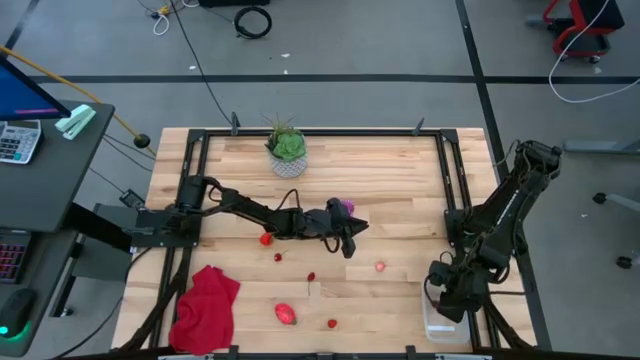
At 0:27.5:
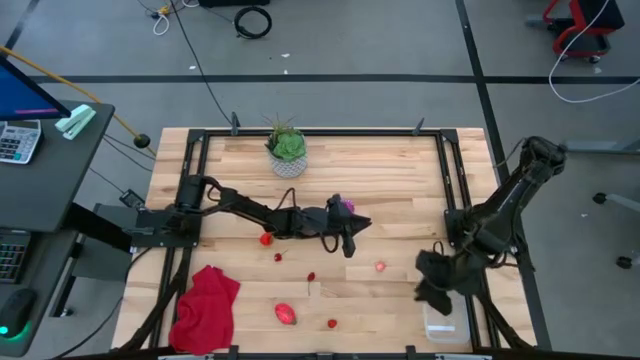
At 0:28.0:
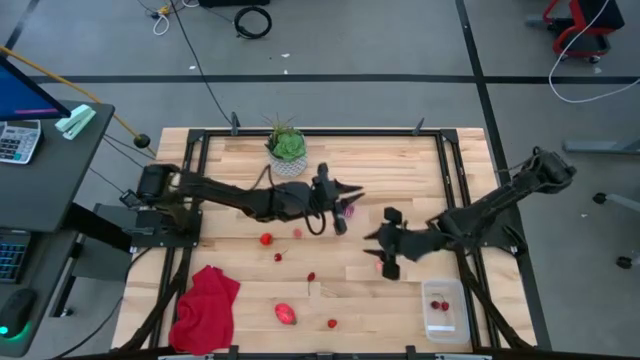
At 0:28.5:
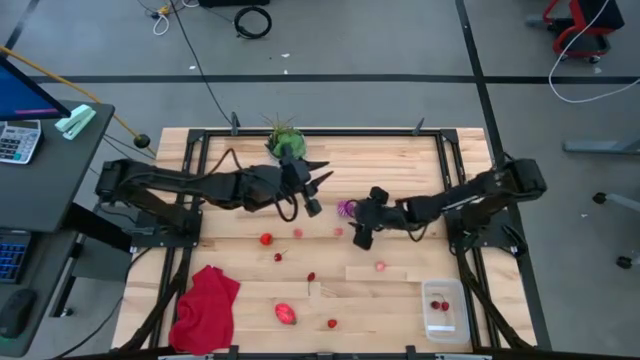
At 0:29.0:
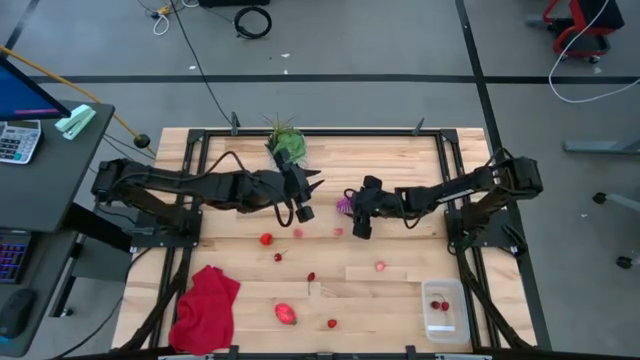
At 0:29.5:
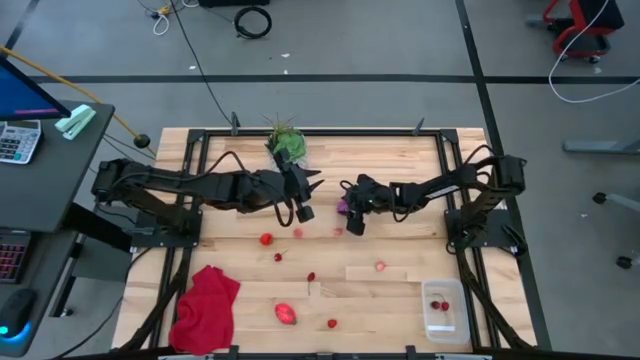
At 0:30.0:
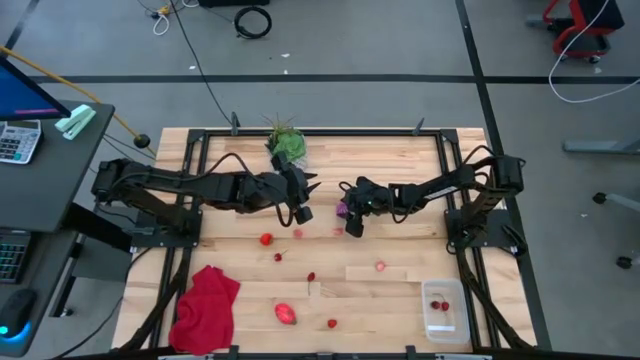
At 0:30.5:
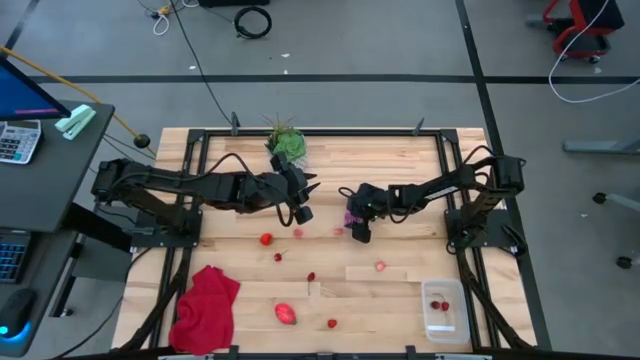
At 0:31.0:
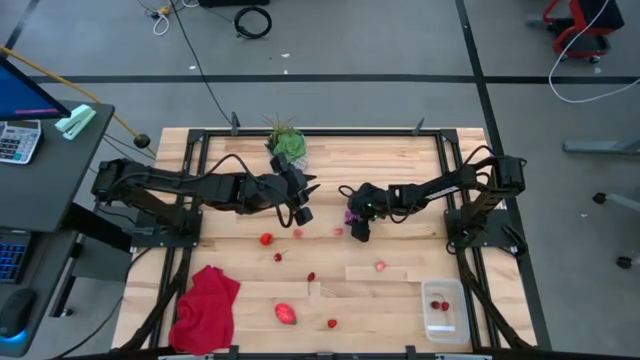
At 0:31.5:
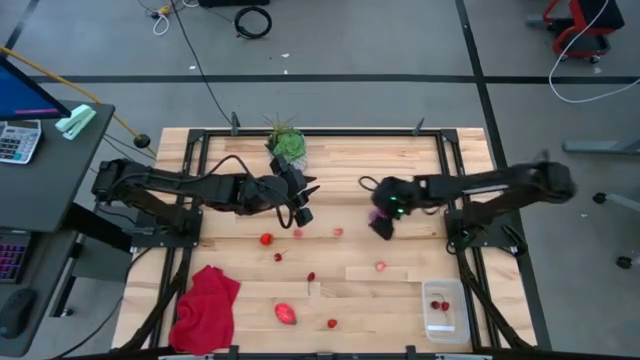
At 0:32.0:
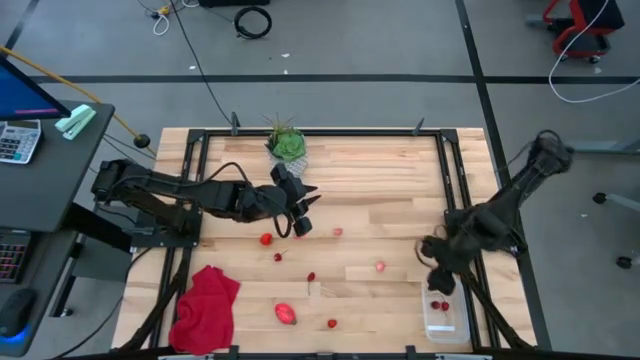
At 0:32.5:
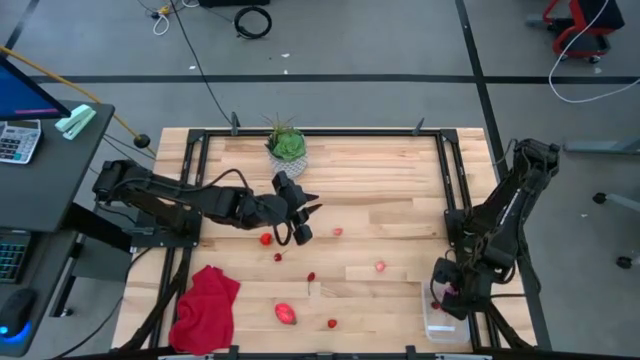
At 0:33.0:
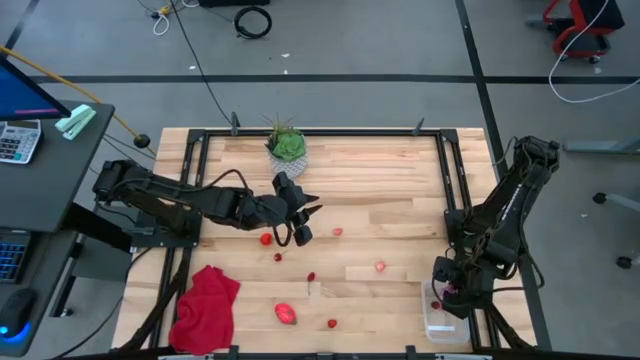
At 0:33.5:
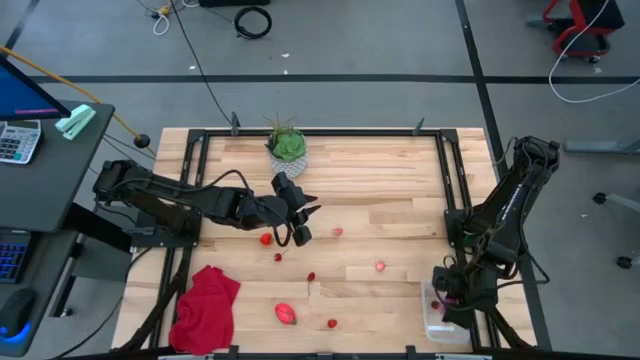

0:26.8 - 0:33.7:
Task: Pick and placing Produce into tupperware
Put the purple onion into the transparent container

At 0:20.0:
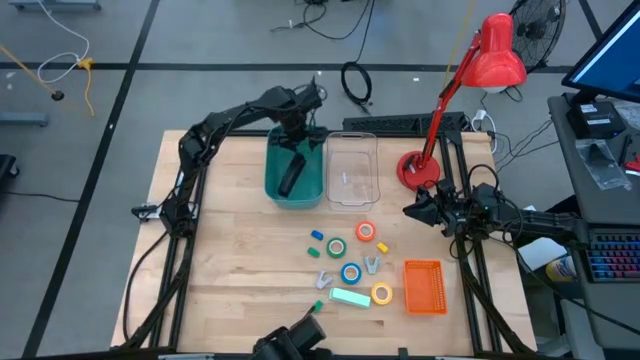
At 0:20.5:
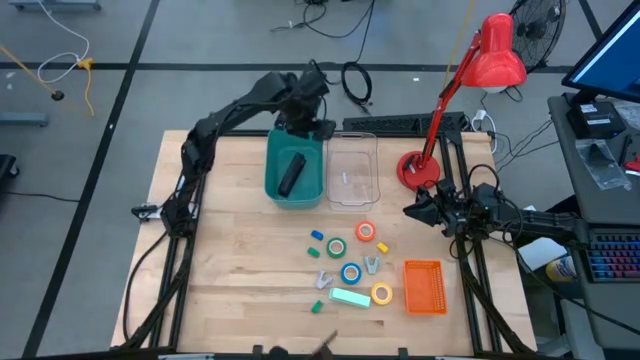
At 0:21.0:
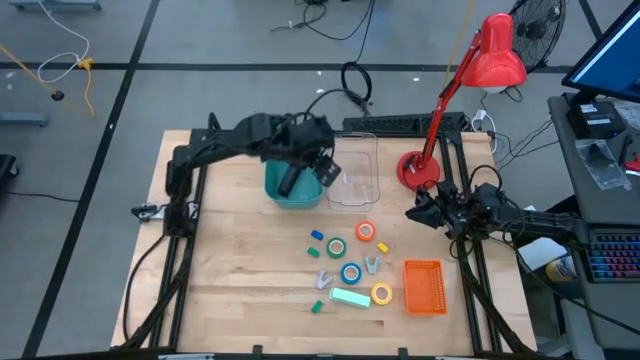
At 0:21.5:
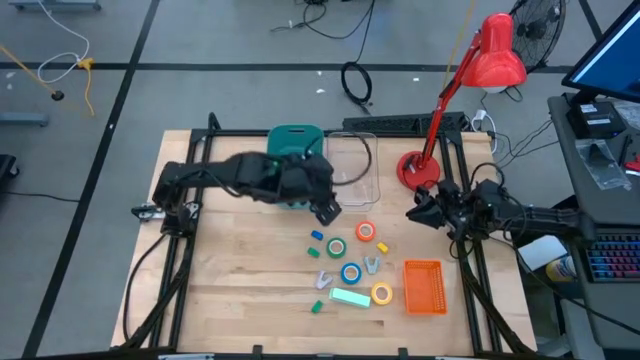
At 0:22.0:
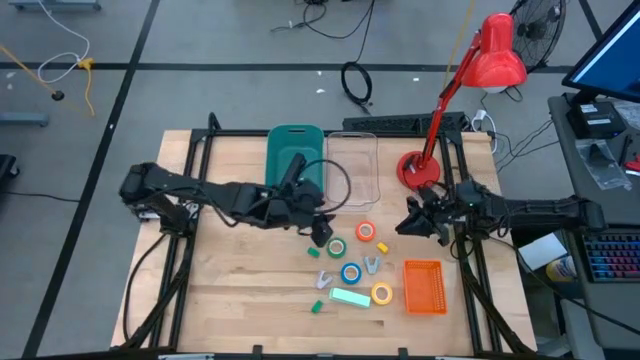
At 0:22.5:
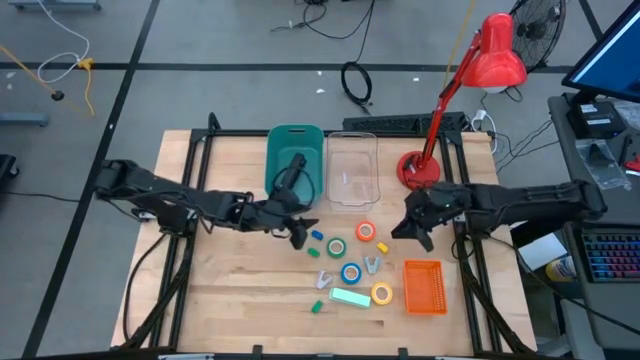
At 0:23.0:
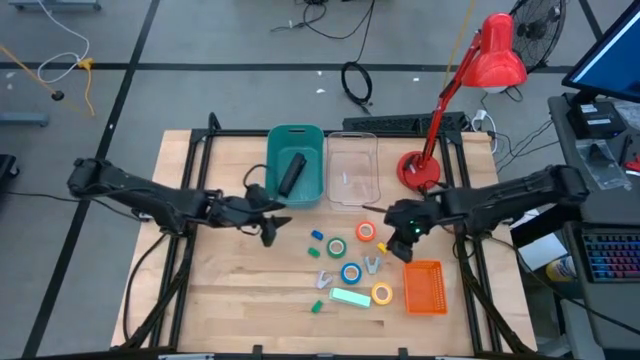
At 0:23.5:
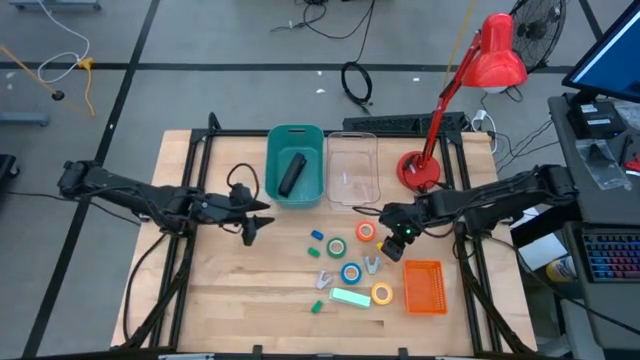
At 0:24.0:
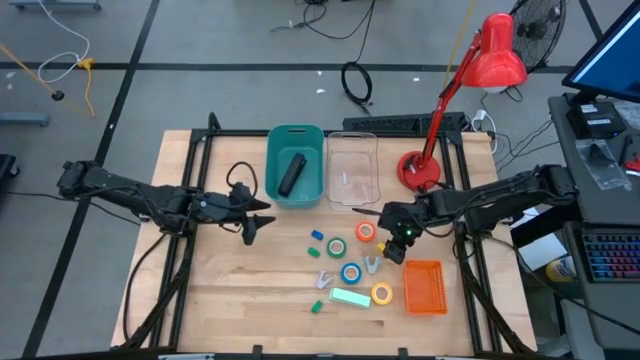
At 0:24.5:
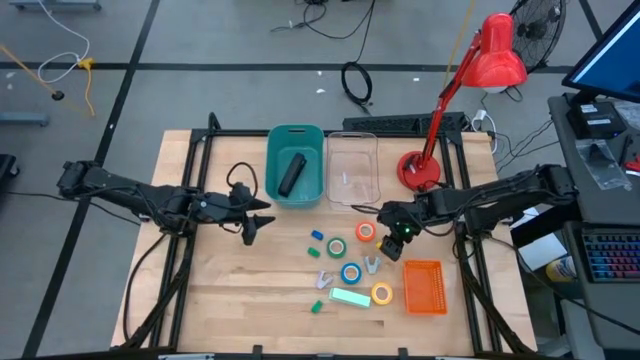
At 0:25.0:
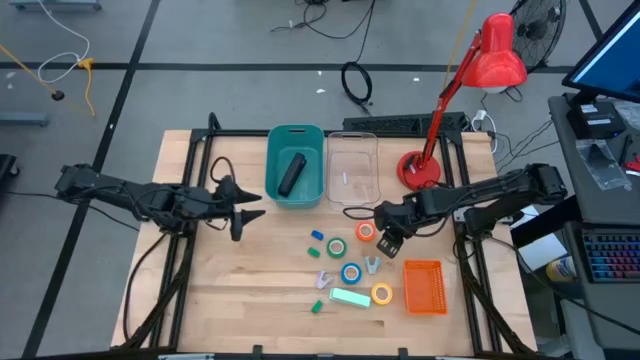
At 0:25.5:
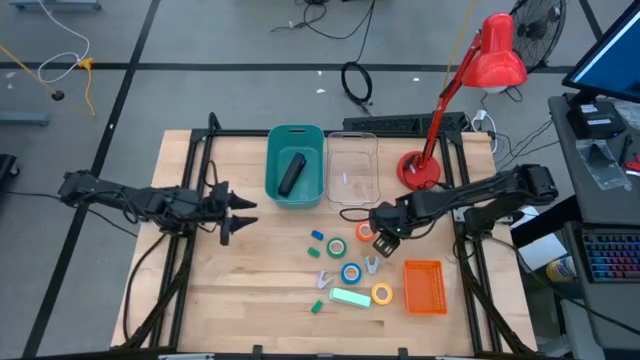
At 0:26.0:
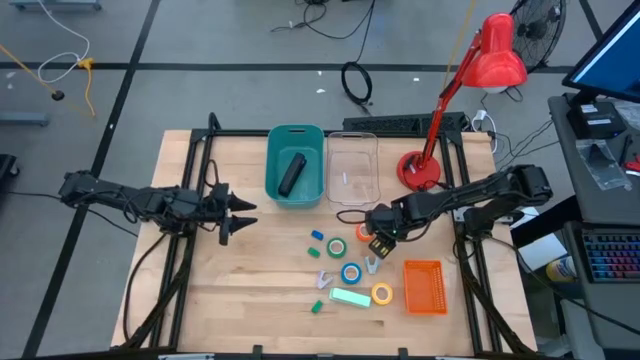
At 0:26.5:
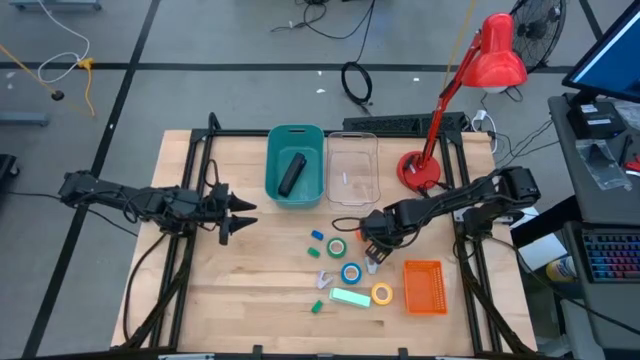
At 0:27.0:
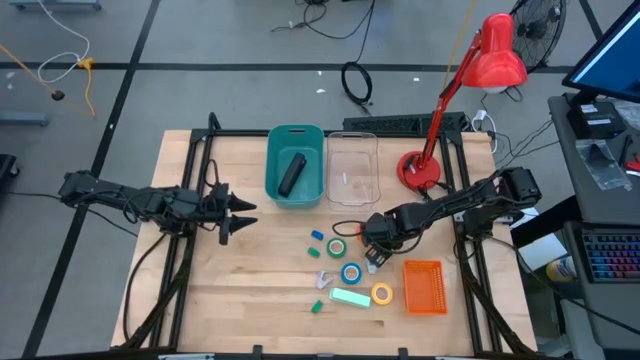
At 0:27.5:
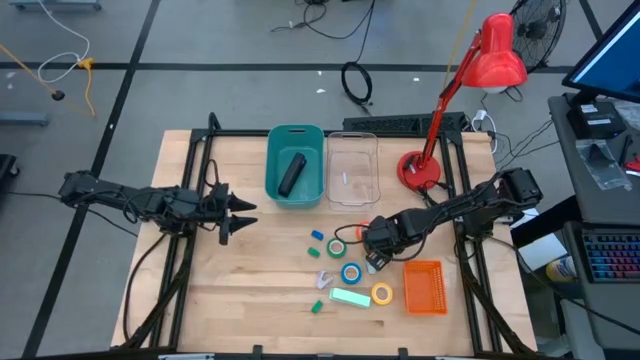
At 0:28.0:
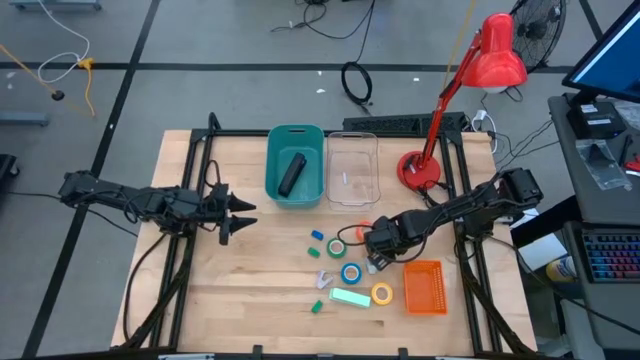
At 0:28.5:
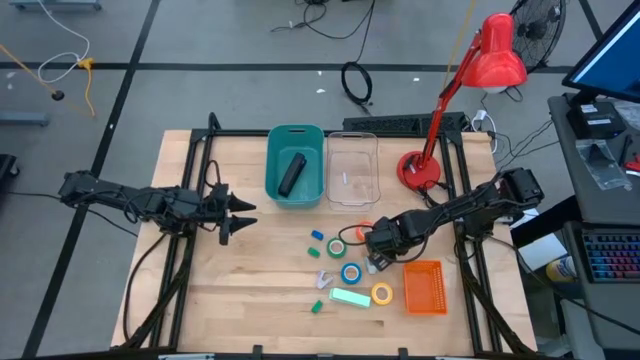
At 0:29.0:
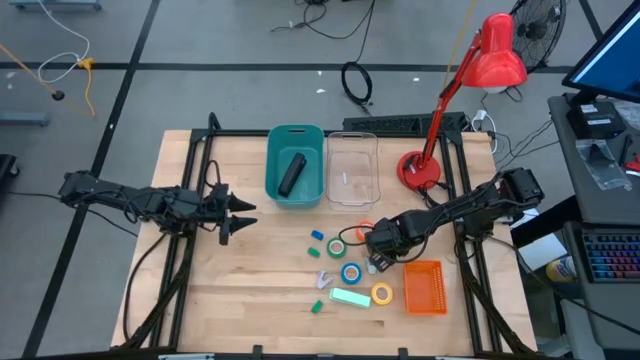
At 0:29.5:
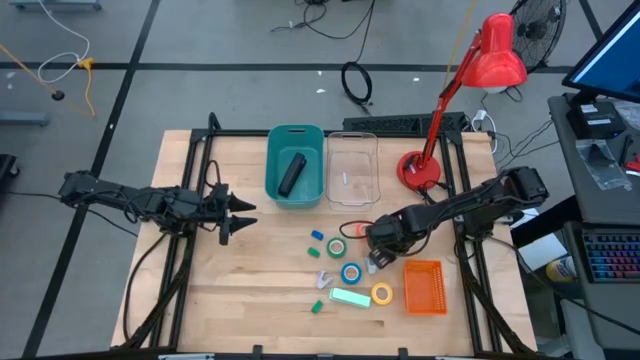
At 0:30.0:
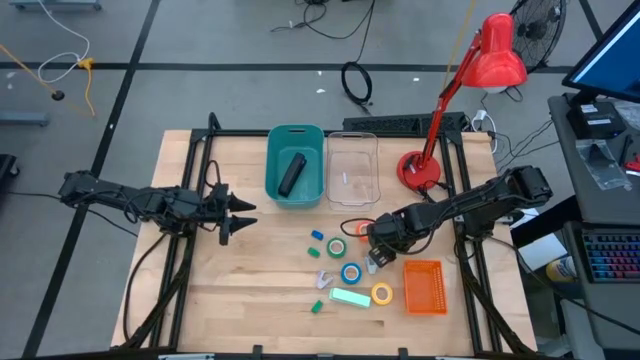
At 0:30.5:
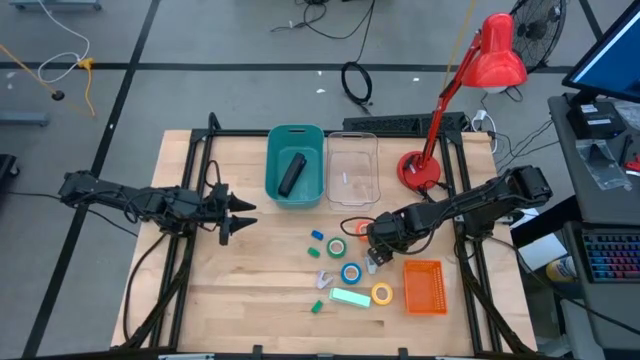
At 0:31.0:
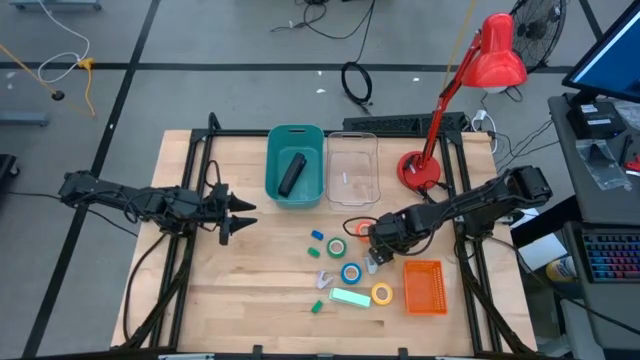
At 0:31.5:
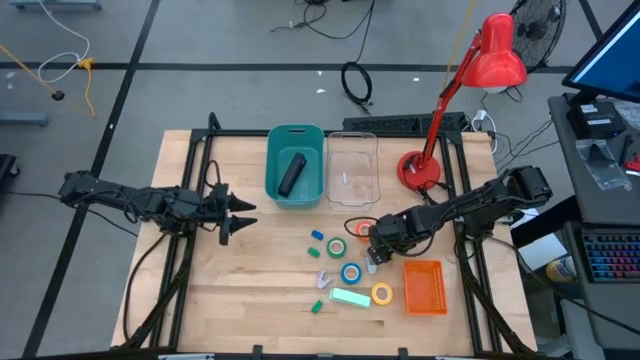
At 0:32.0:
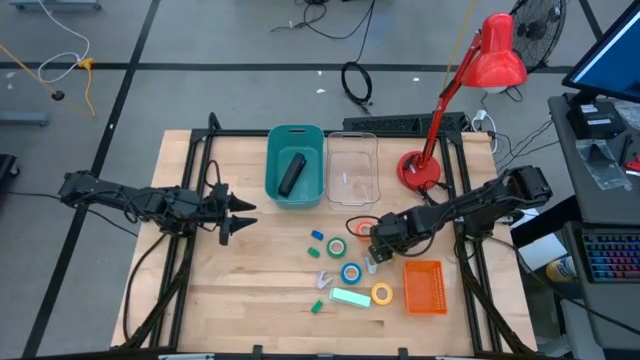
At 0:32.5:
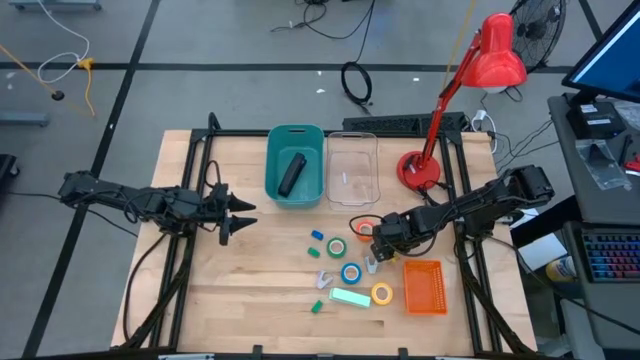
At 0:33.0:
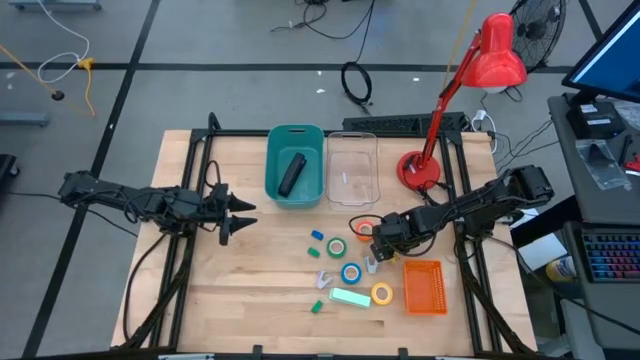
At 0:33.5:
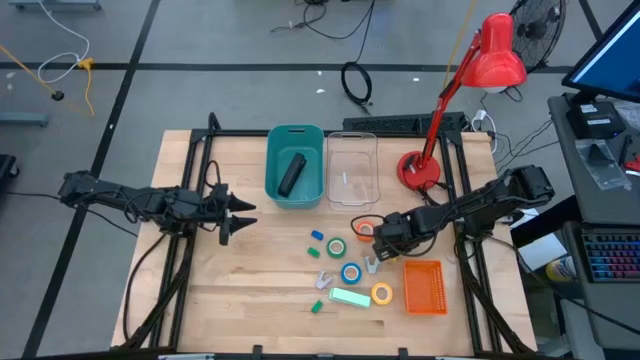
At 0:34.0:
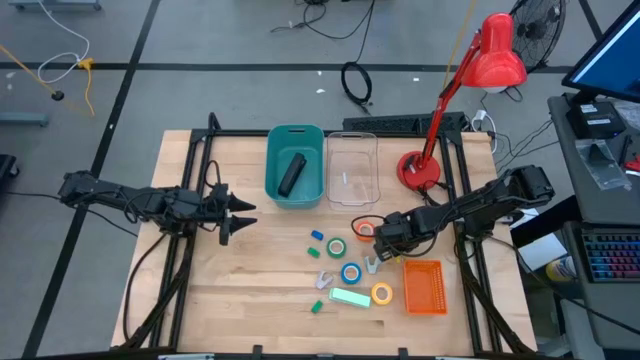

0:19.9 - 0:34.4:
Task: Pick and place Stapler, Stapler remover, tape
Put the small yellow stapler into the green bin
